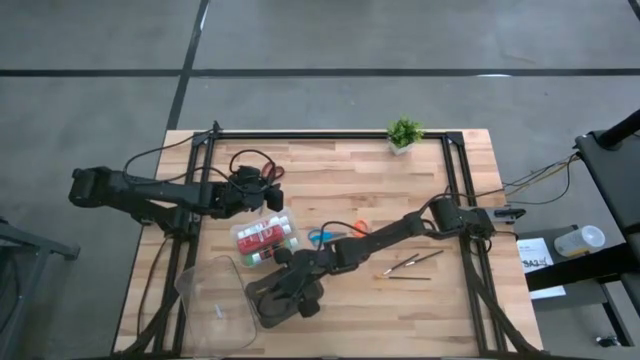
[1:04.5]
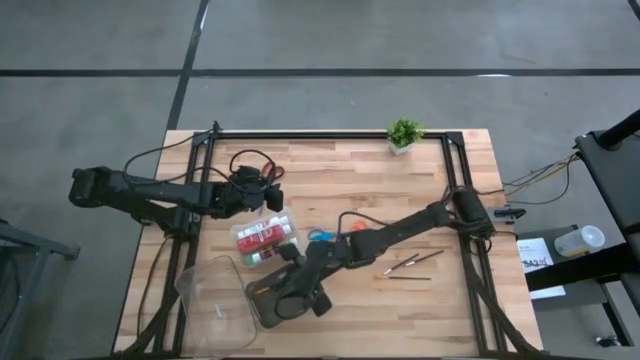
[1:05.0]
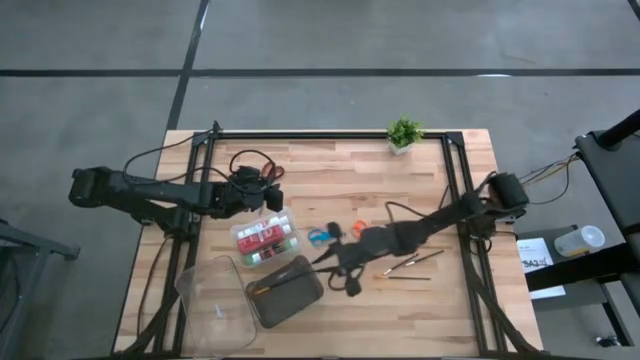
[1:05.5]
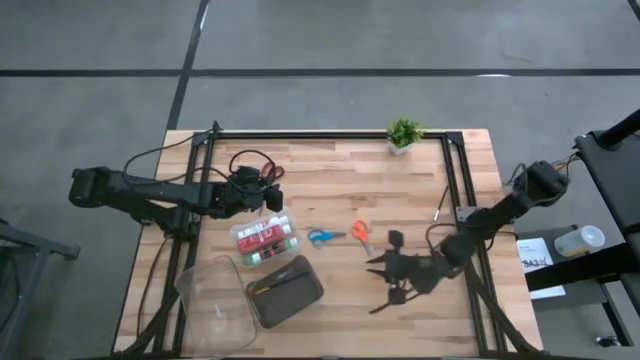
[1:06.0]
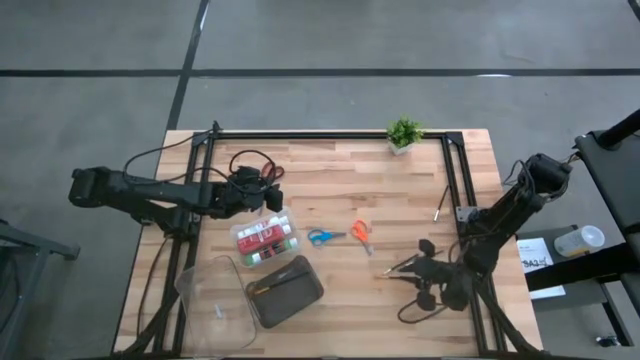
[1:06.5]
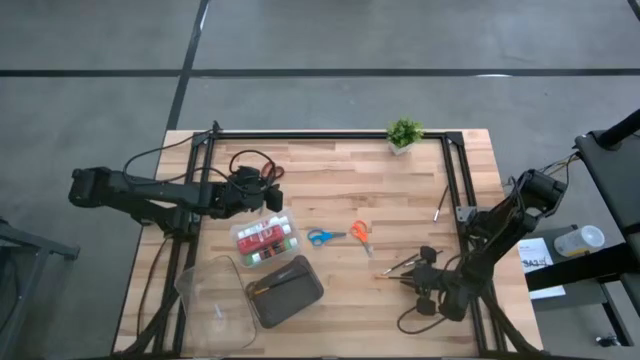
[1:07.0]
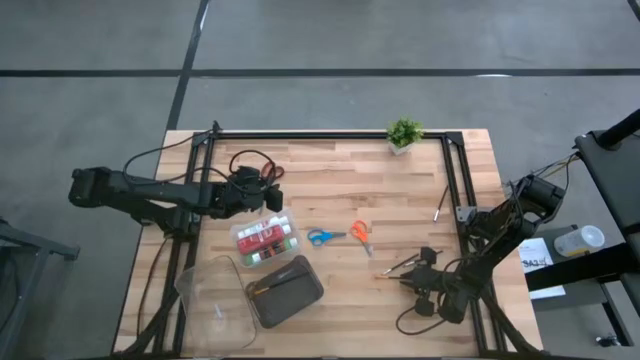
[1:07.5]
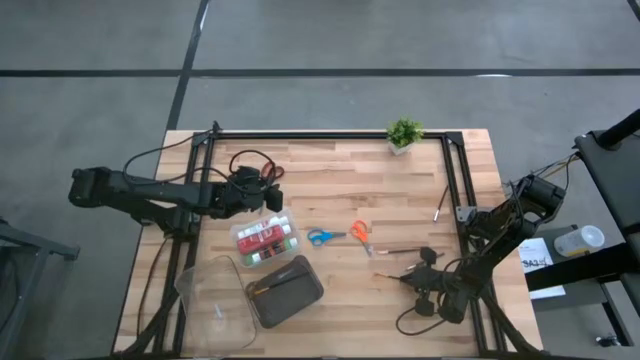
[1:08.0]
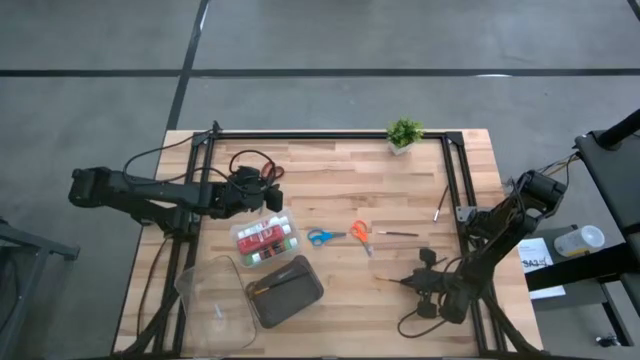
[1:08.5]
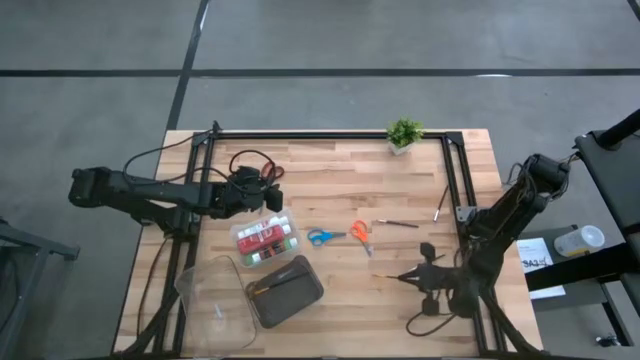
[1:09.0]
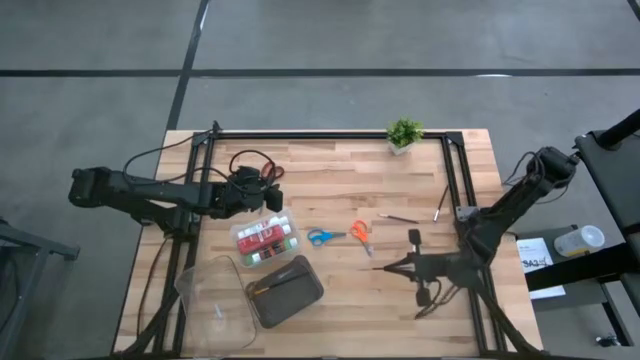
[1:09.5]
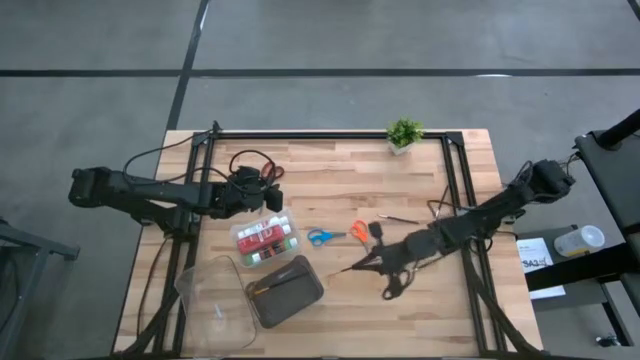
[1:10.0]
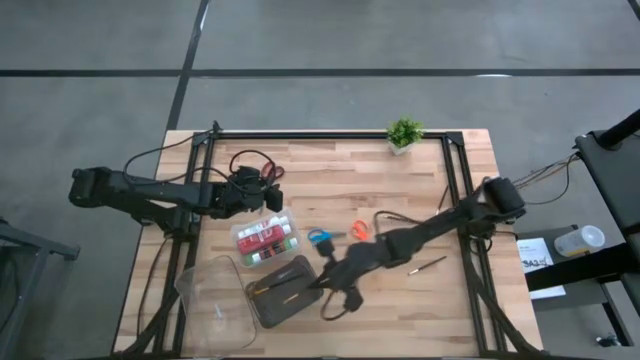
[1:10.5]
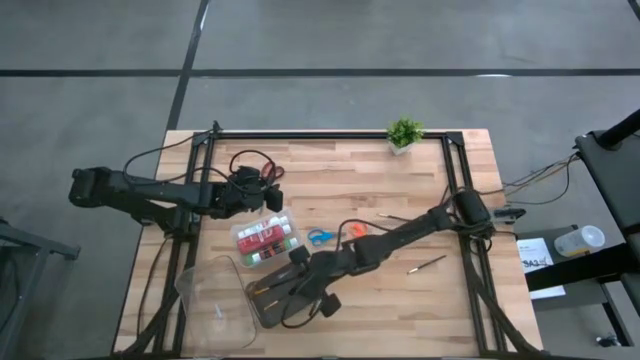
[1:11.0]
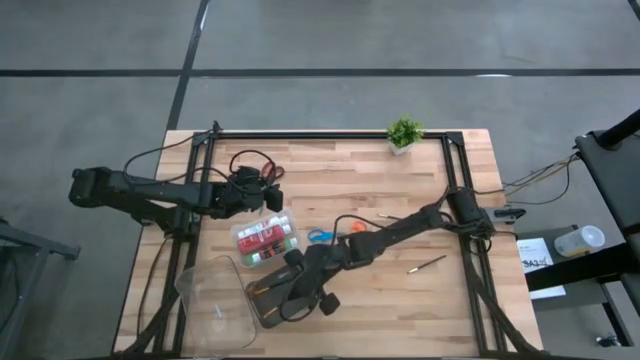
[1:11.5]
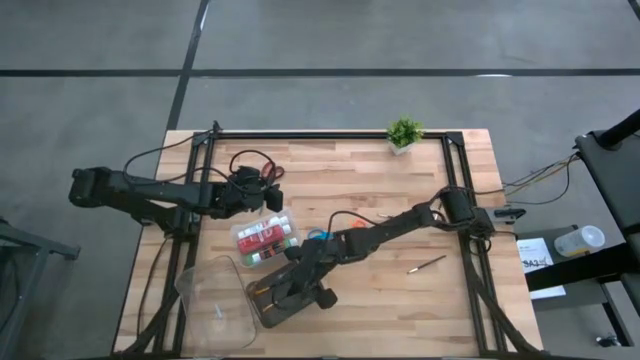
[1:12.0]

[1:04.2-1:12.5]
Task: Pick & Place Paint Supplies
Put the gold paint brush into the black transparent bin

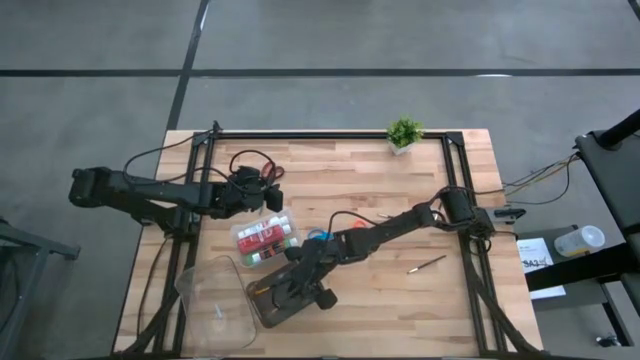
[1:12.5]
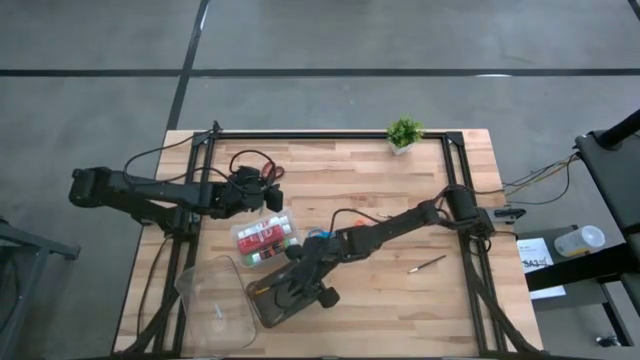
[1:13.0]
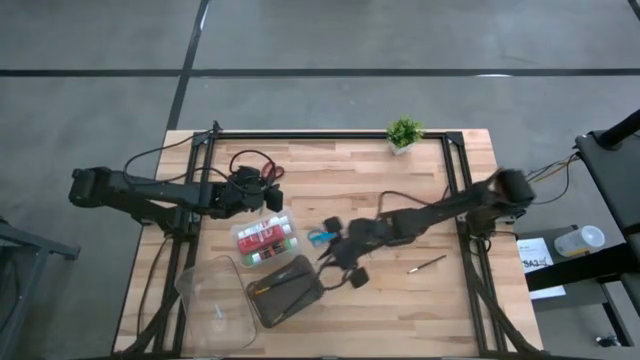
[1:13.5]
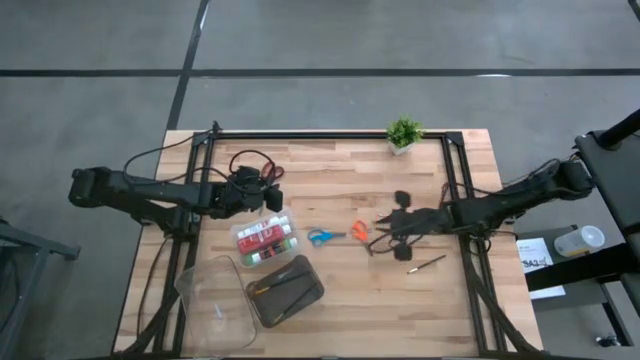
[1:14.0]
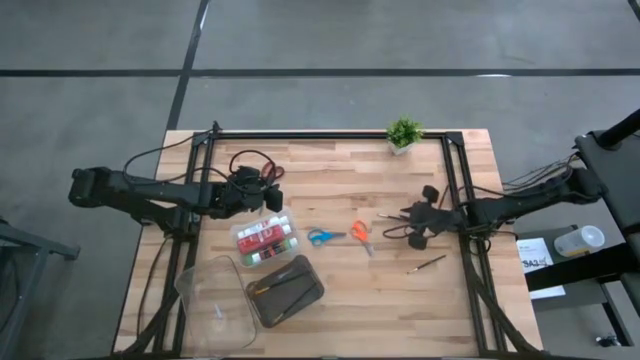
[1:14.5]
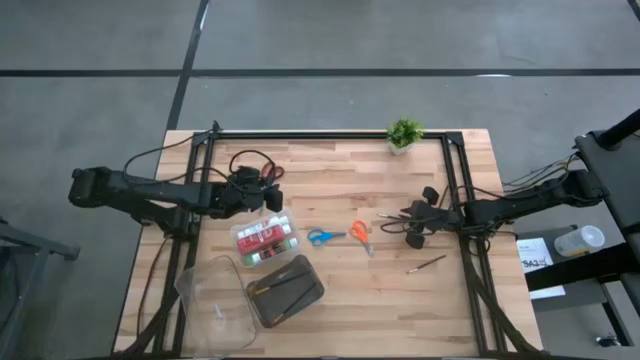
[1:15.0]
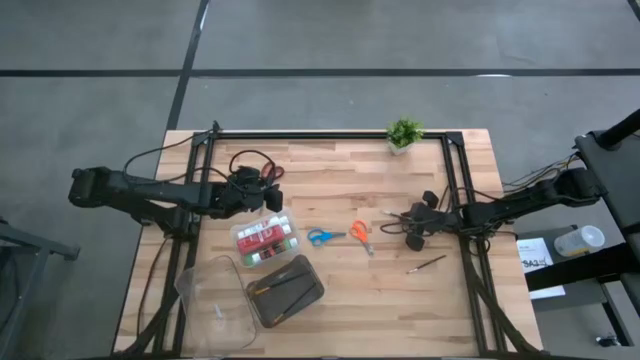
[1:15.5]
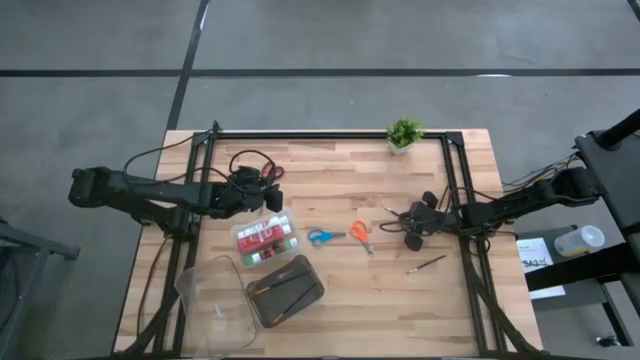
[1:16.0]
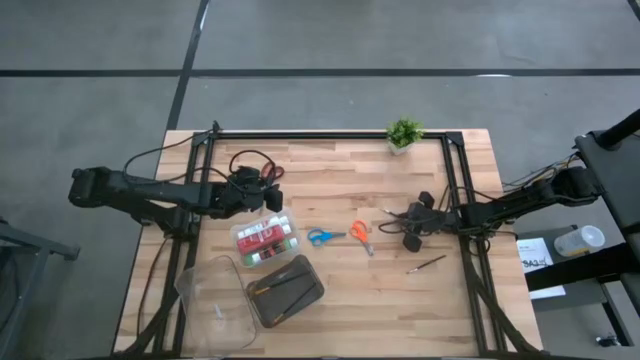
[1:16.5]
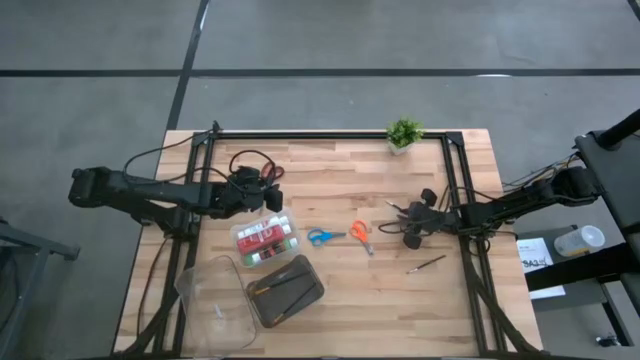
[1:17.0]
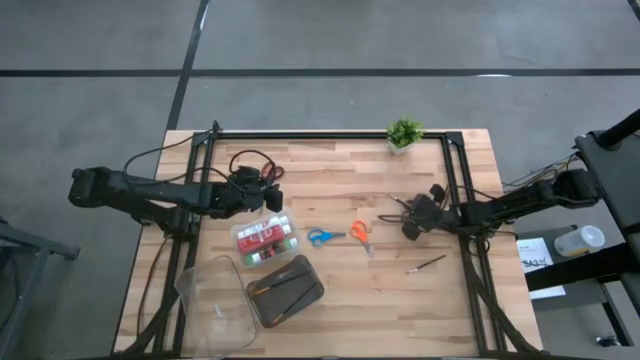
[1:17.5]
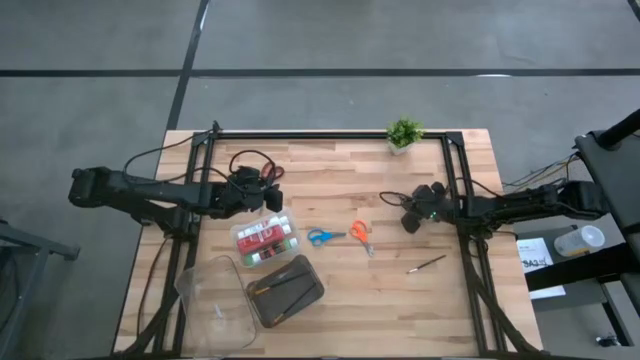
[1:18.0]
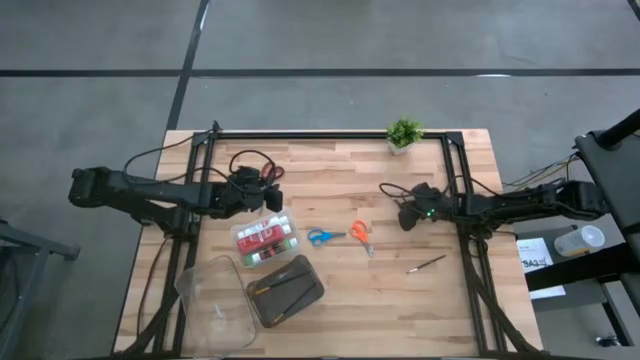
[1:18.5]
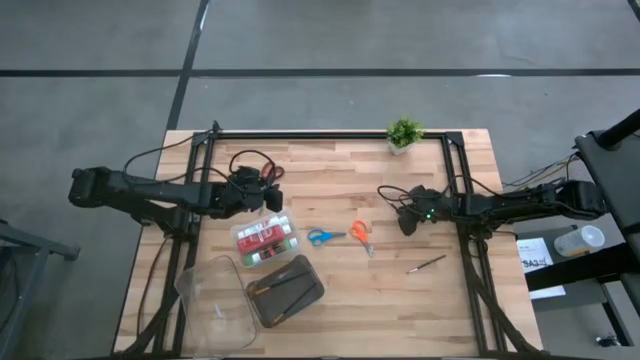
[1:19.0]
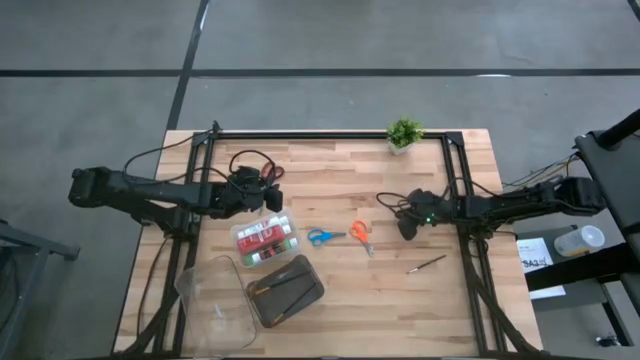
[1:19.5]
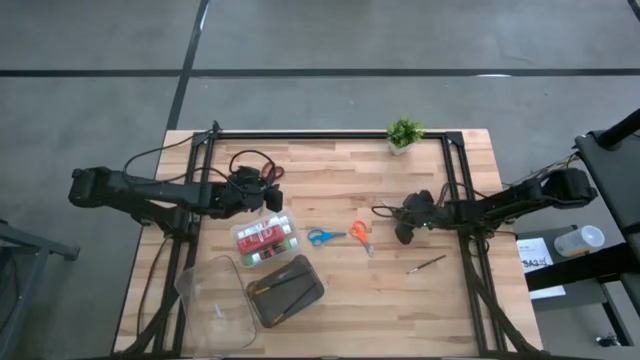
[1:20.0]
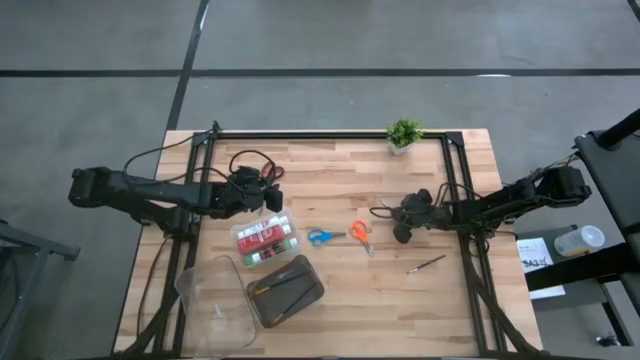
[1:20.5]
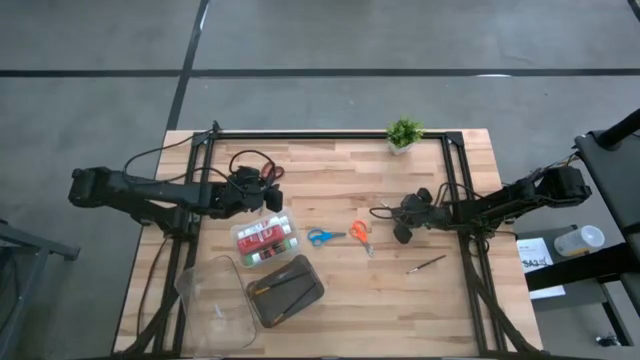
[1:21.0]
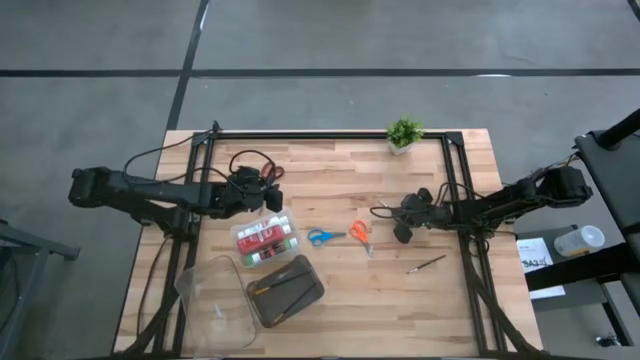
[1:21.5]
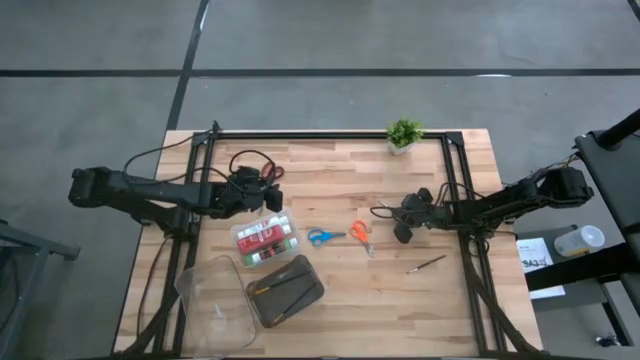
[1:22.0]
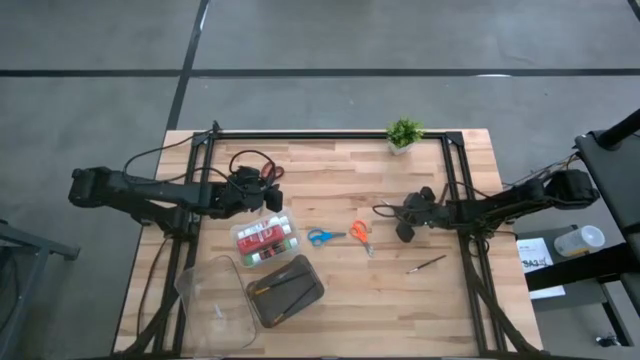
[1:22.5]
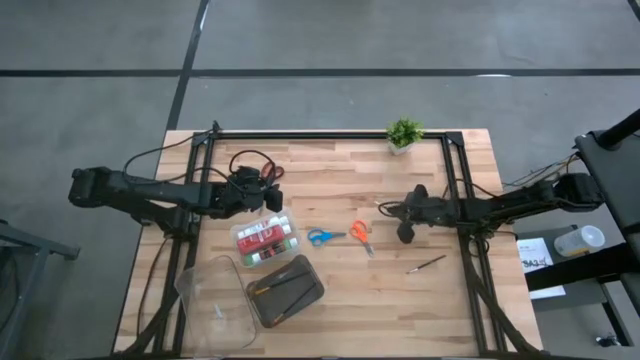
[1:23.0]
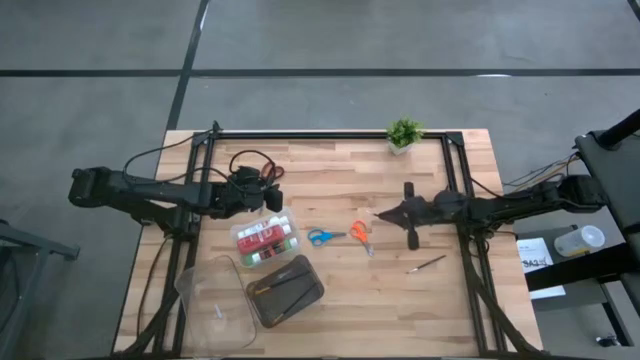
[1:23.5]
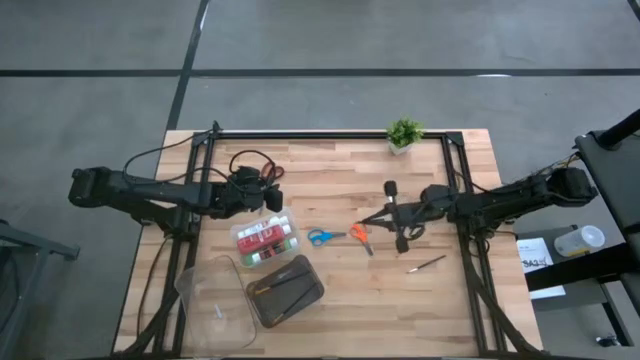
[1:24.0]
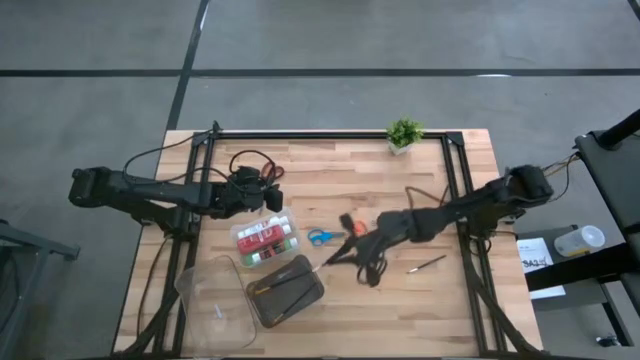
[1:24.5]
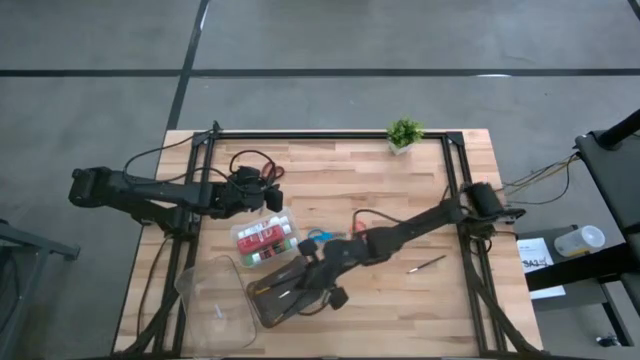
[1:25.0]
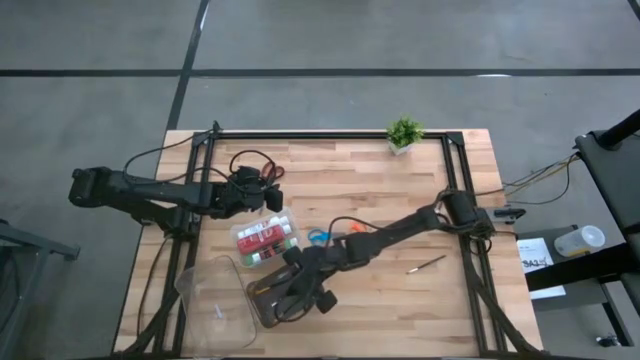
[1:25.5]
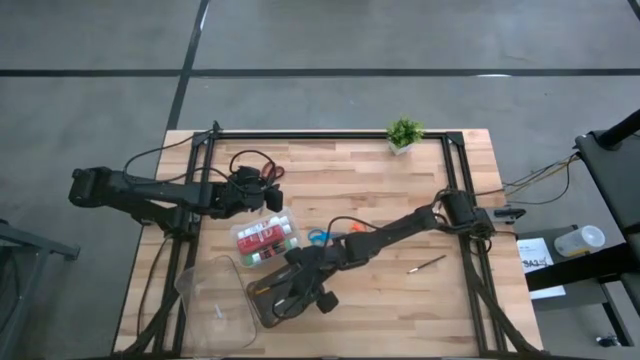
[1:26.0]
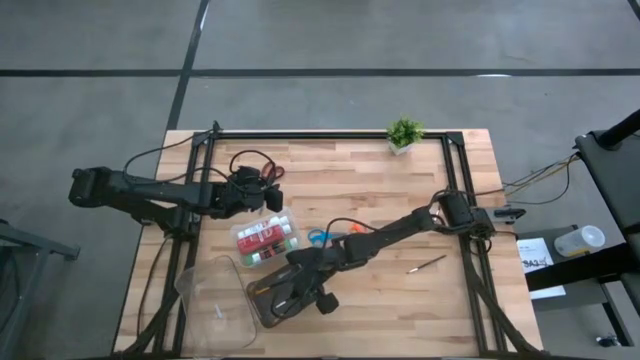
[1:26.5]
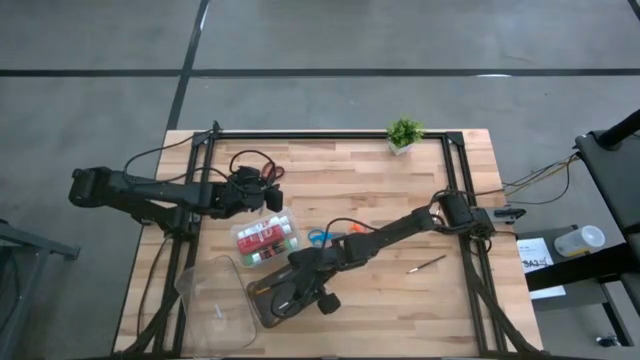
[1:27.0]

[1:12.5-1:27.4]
Put the middle silver paint brush into the black transparent bin
